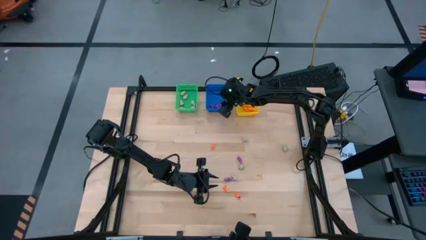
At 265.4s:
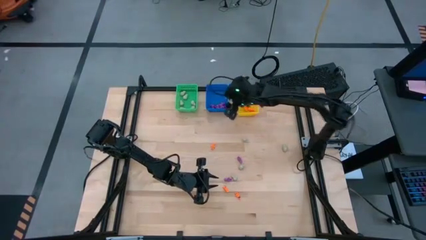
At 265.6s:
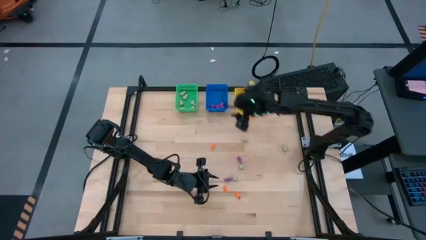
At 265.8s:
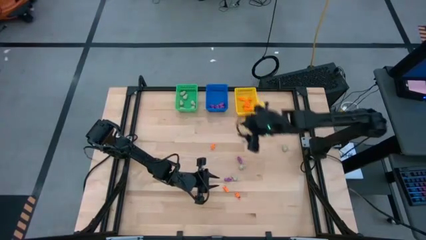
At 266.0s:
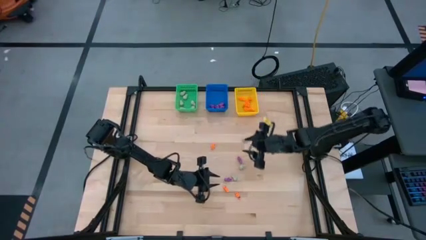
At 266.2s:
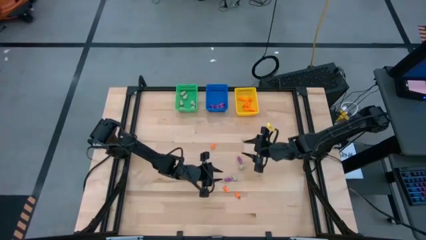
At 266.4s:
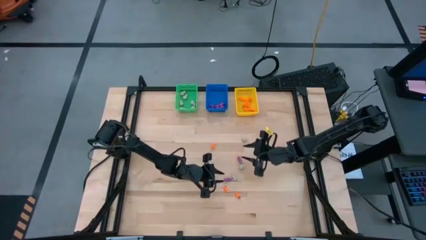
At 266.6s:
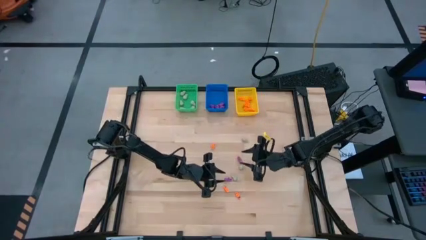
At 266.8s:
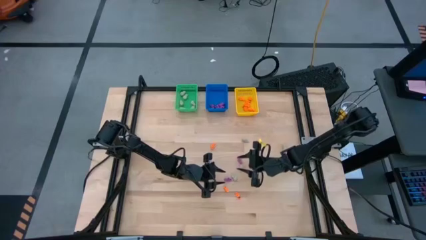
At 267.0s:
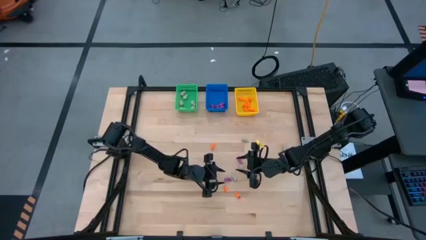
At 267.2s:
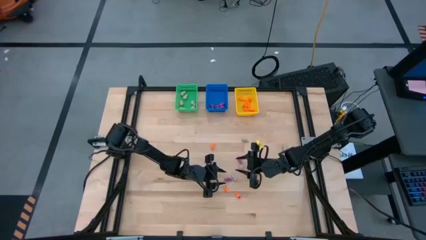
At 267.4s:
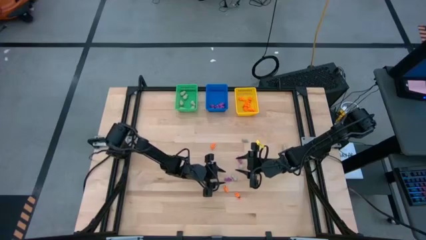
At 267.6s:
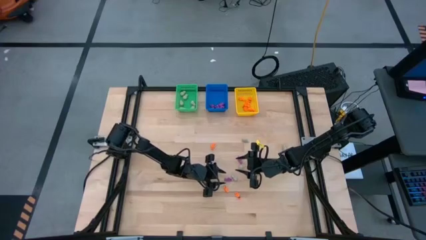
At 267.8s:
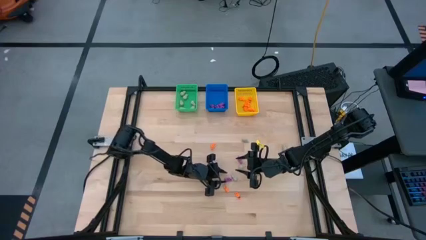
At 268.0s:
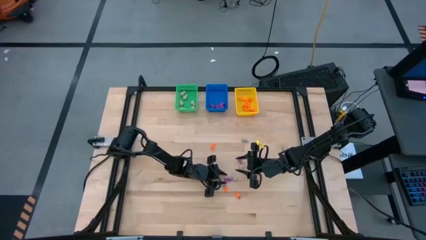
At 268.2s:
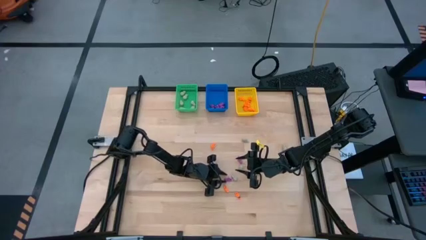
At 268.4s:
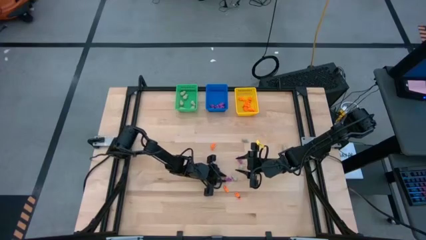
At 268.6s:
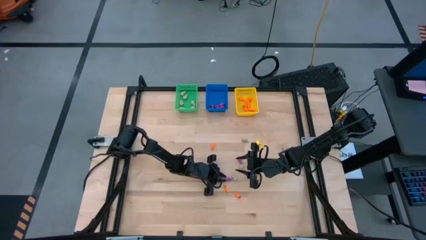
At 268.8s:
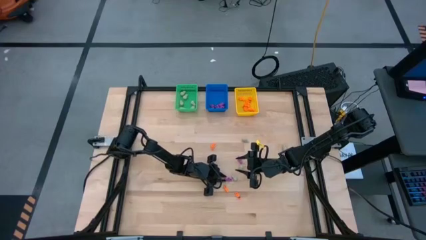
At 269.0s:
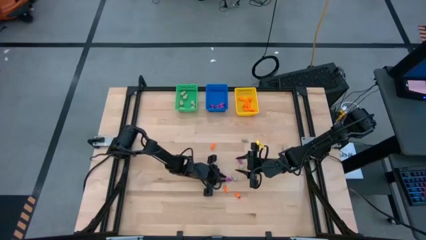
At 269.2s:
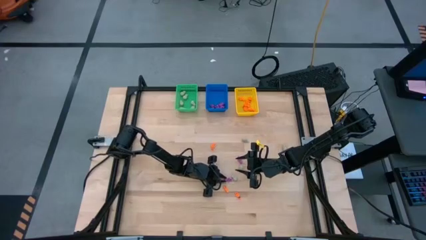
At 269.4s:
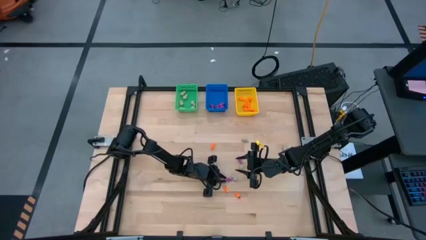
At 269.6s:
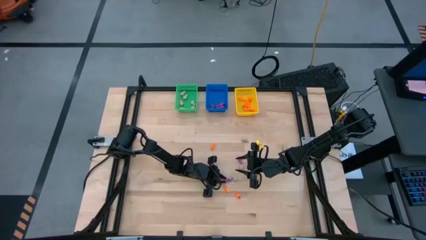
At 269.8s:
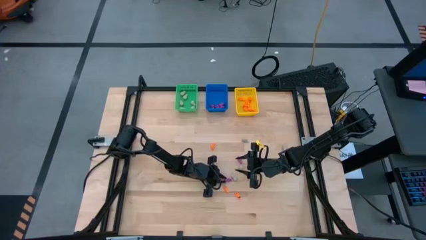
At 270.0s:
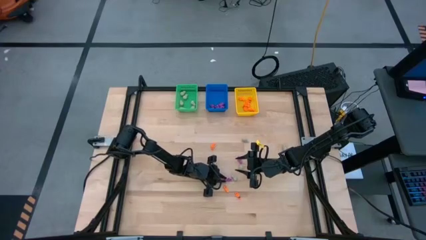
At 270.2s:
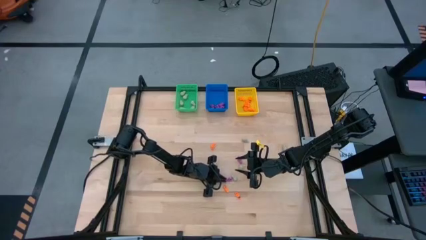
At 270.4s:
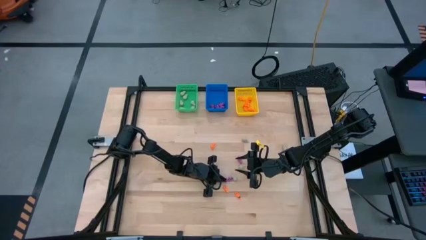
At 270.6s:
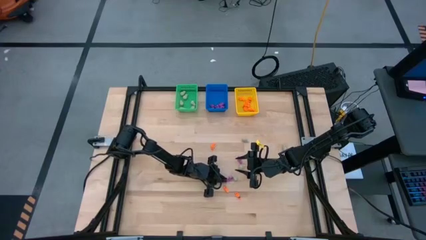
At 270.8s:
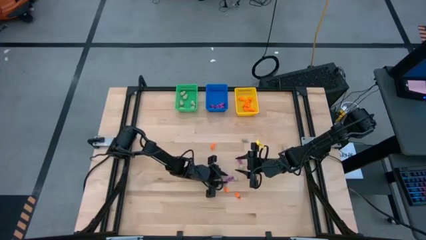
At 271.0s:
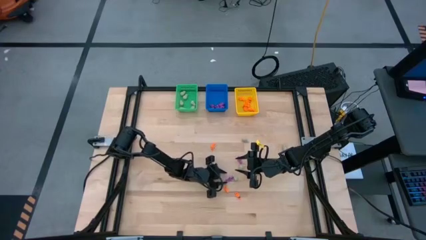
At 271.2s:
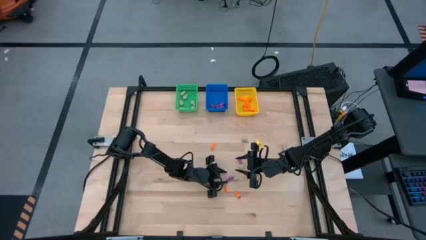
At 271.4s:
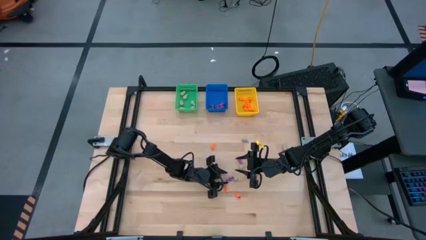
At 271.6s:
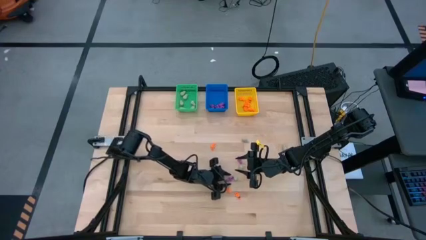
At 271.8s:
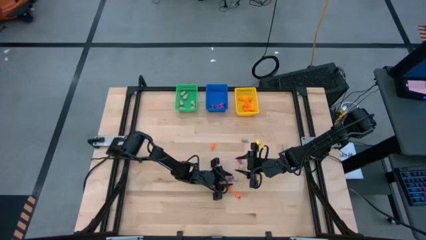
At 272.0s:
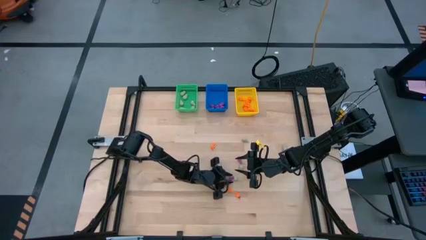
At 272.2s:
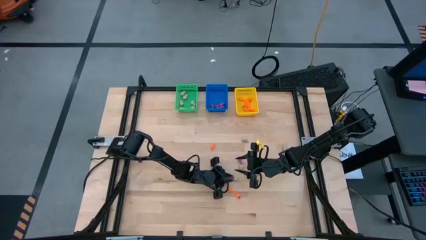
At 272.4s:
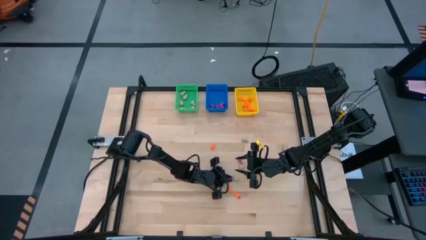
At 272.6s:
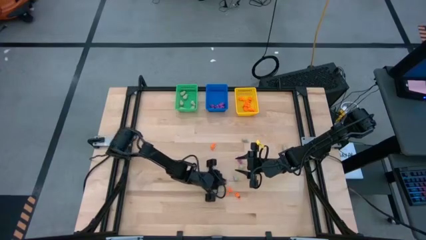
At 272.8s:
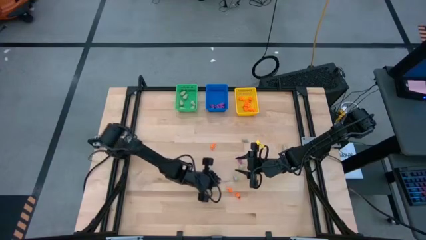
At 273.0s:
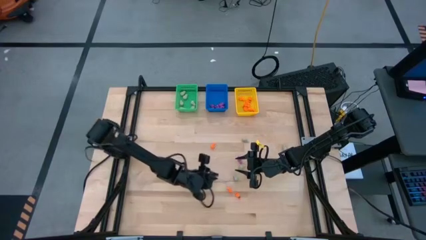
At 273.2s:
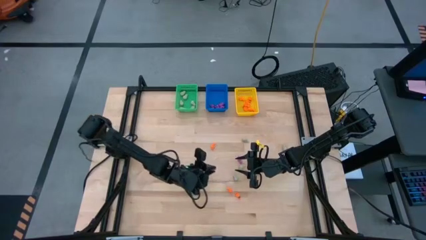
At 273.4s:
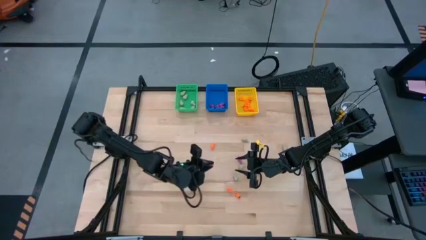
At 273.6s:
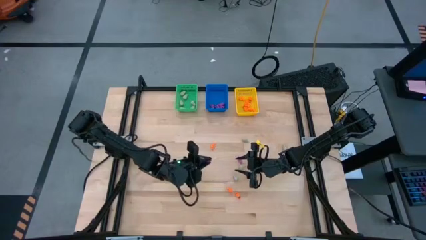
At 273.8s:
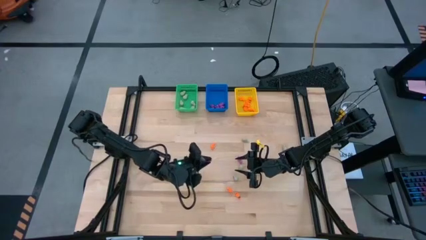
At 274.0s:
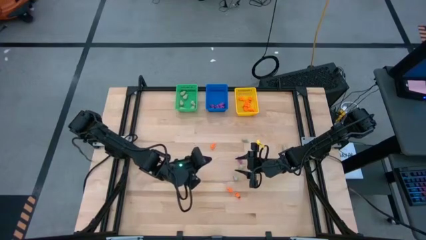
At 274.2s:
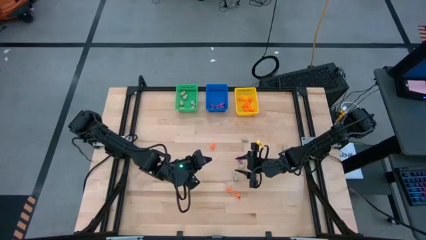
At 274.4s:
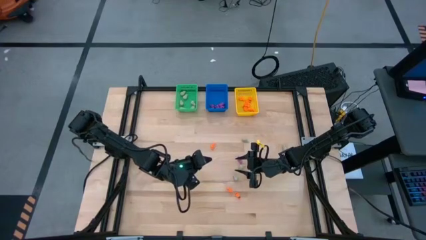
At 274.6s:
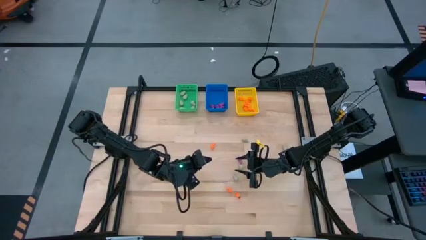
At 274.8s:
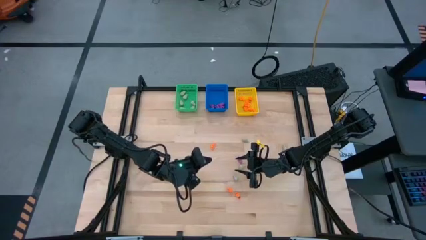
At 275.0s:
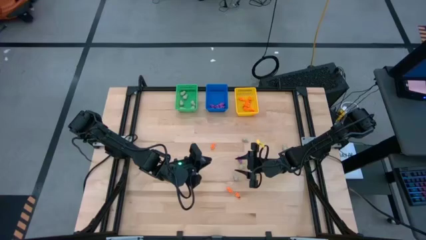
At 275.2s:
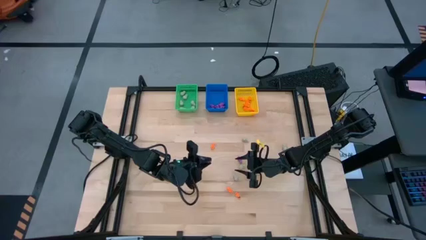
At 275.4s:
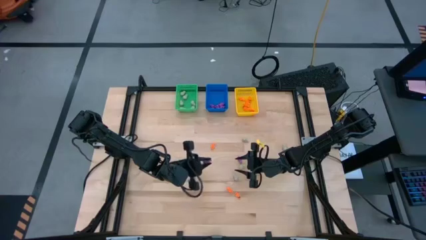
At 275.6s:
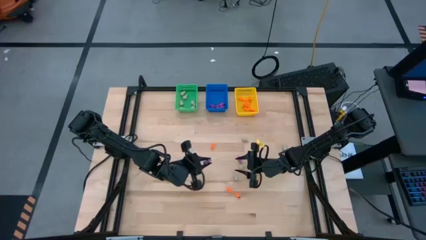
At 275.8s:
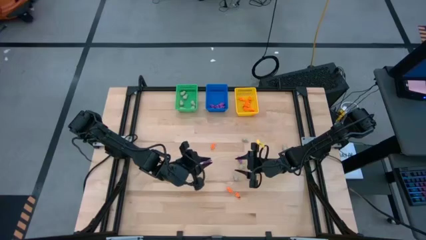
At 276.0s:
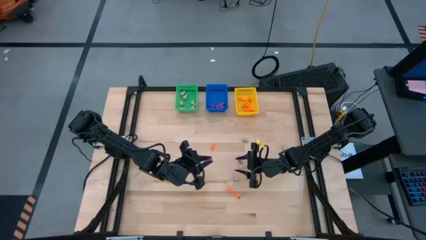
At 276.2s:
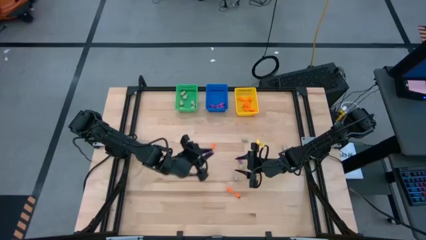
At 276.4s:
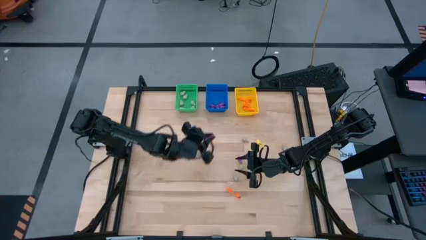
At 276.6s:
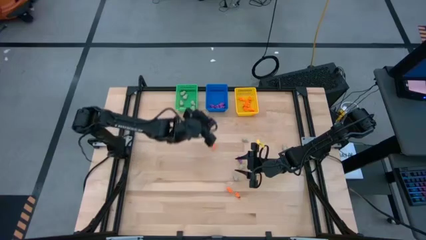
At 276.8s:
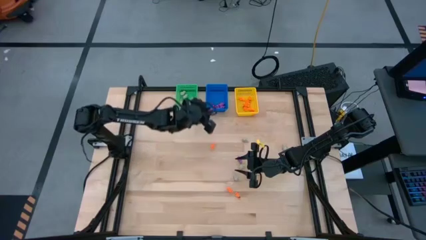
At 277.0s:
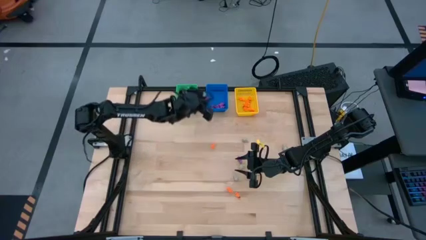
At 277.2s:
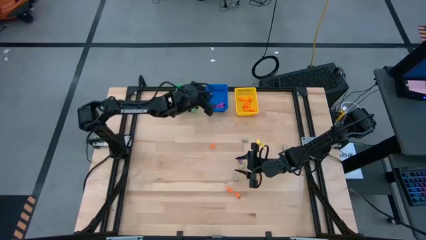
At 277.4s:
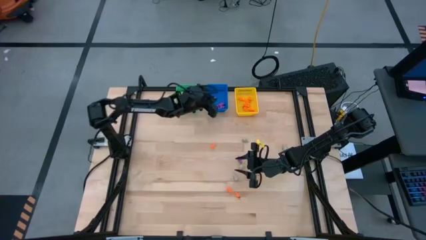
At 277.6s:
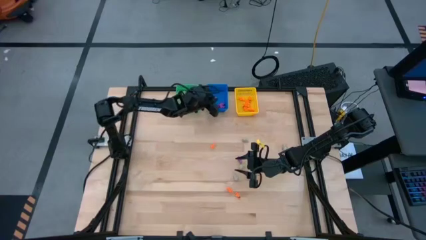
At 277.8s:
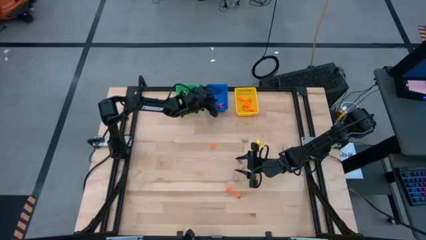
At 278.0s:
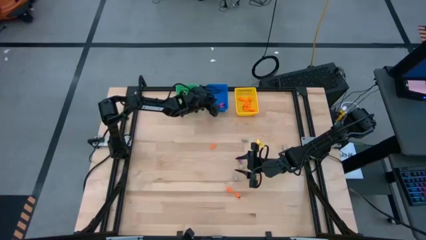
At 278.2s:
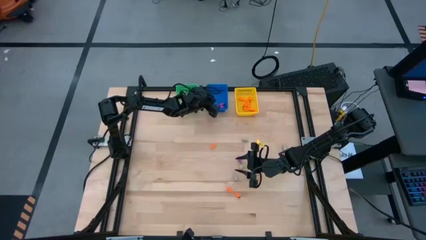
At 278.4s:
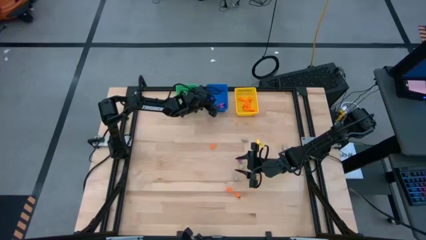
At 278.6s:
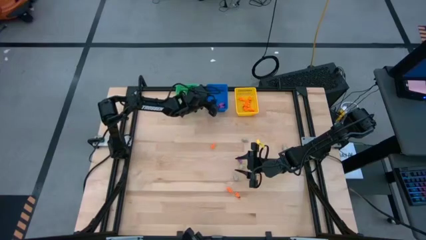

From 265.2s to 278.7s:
Task: Sort Halloween decoration
Put the purple skeleton toy into the blue bin

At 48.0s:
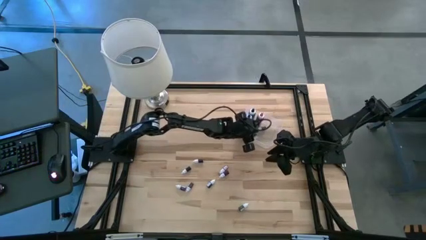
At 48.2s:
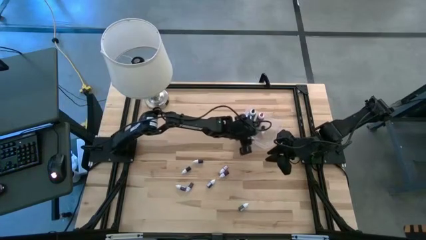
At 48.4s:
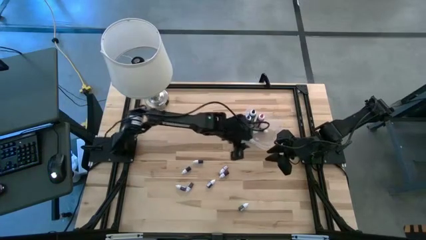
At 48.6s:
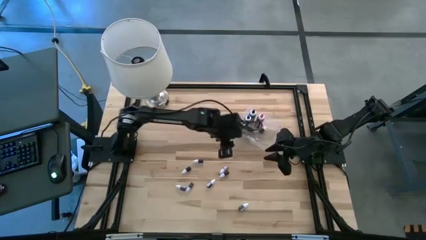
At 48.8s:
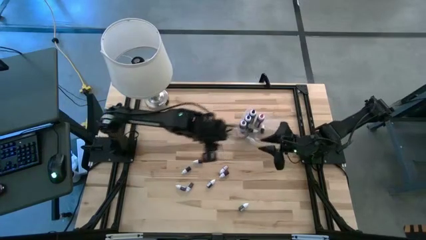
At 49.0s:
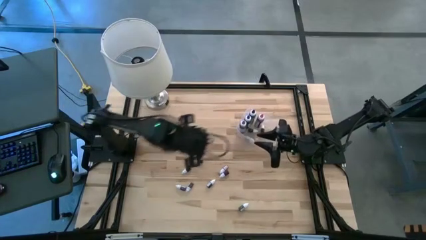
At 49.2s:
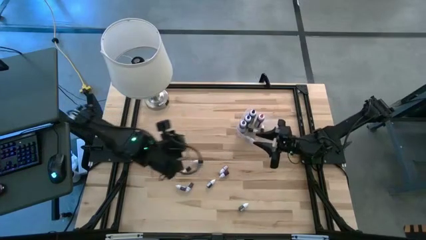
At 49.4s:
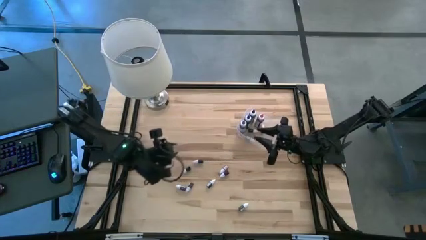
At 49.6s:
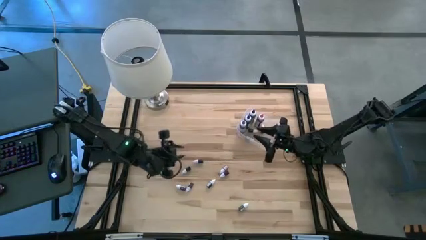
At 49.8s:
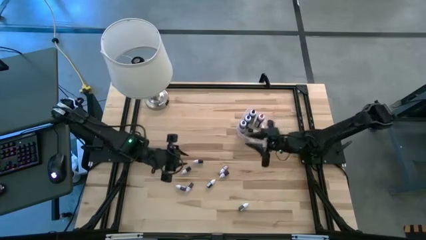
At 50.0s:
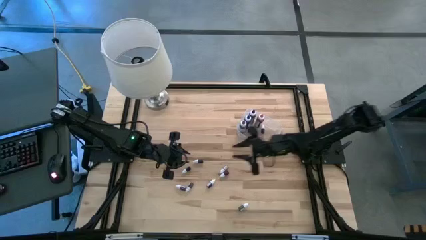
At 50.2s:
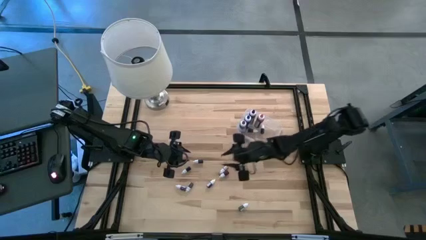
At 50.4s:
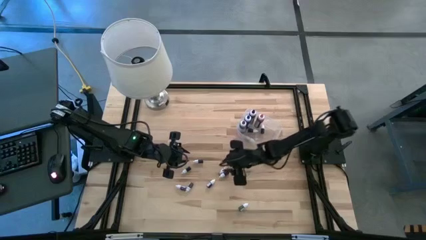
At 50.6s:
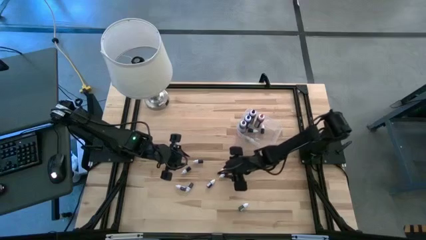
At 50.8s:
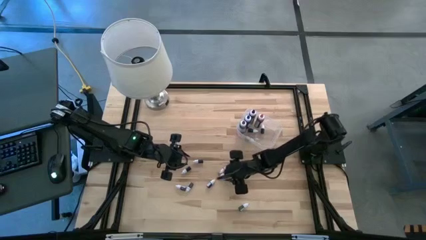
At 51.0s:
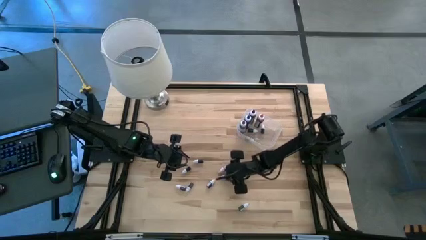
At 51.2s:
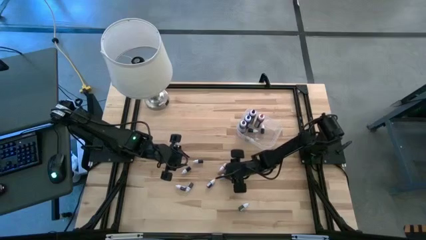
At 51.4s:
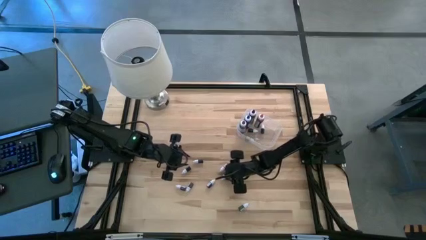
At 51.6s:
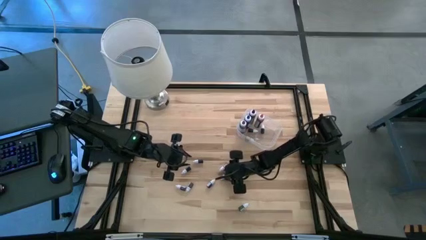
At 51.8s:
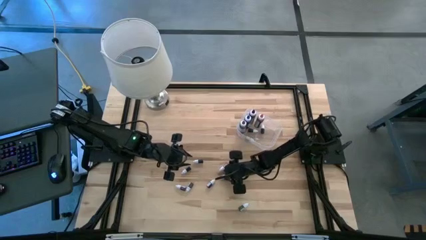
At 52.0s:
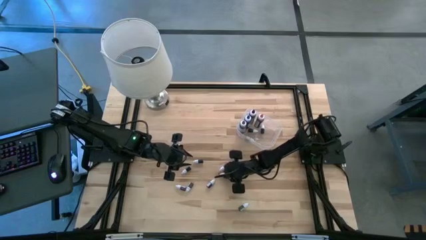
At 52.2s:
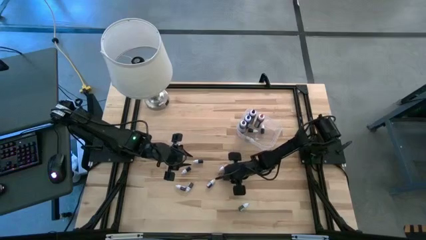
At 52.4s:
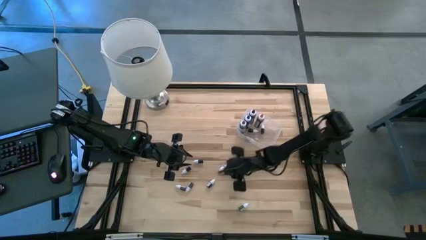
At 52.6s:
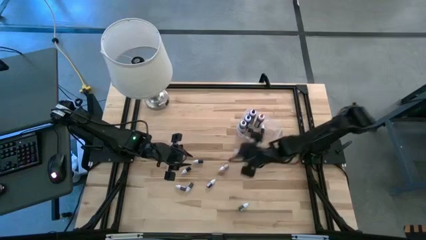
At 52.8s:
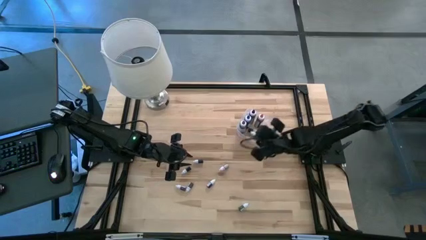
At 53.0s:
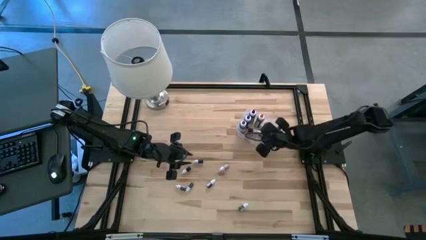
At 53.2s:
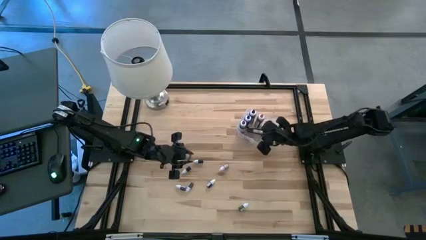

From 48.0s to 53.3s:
Task: Pick & Place food coloring
Put the bottom small red food coloring bottle into the transparent bin
